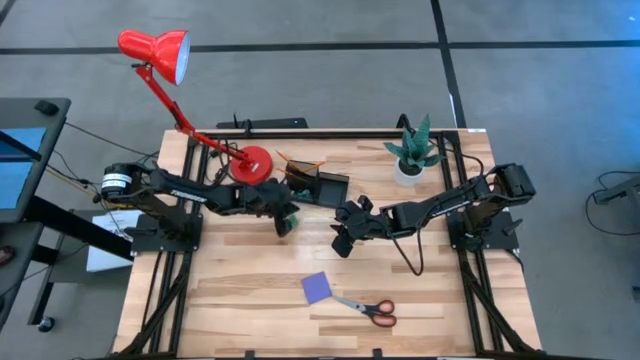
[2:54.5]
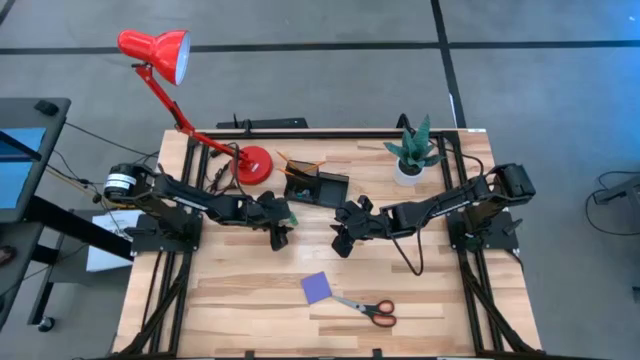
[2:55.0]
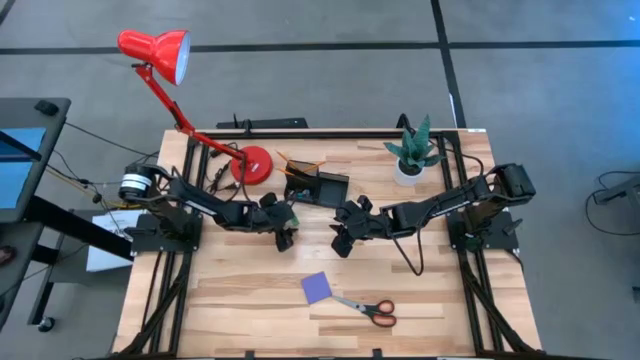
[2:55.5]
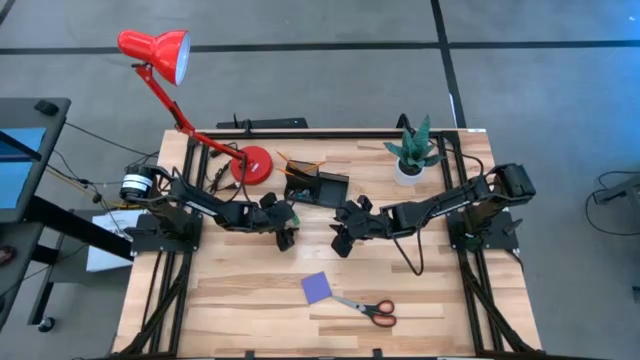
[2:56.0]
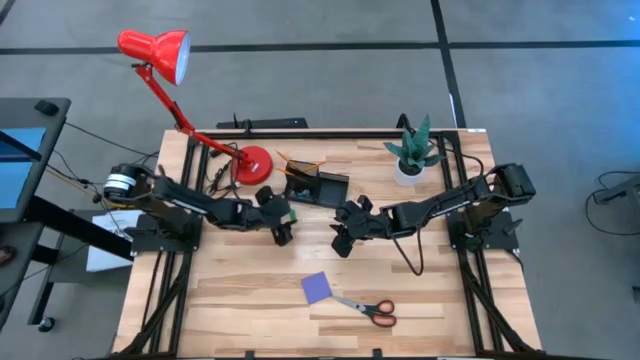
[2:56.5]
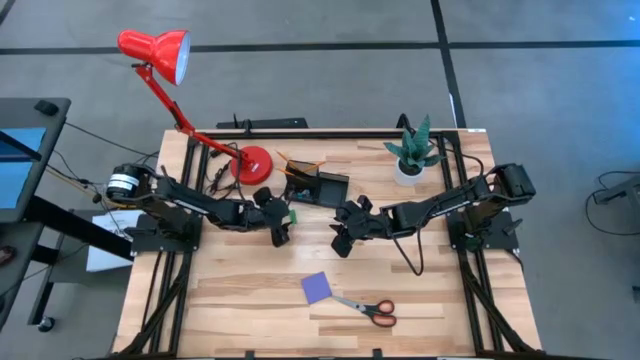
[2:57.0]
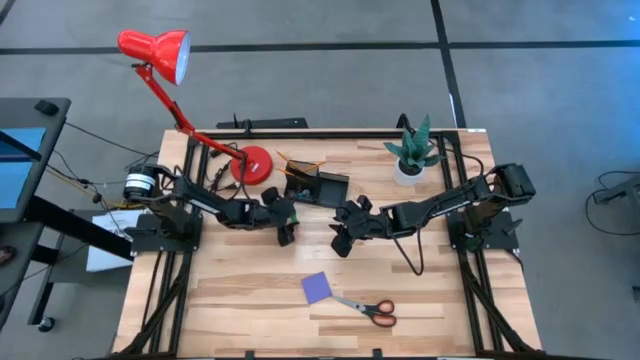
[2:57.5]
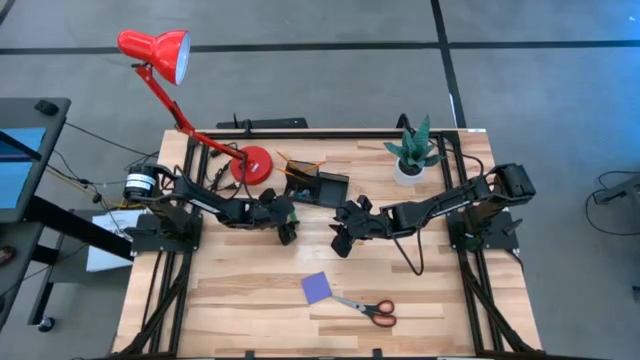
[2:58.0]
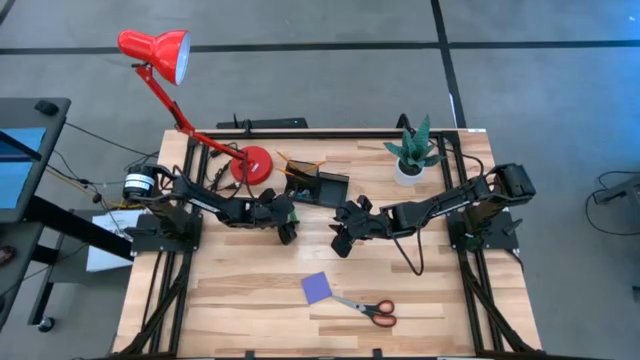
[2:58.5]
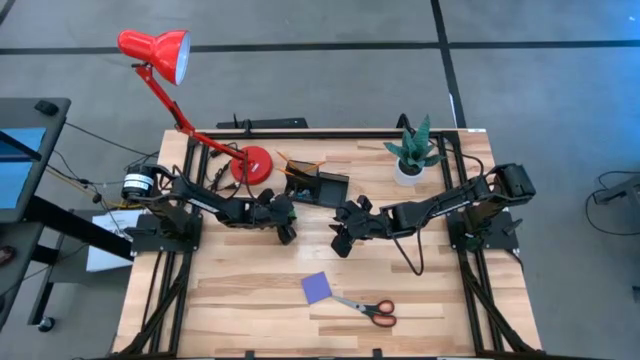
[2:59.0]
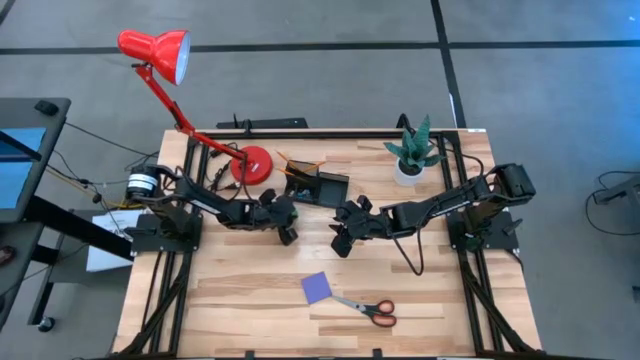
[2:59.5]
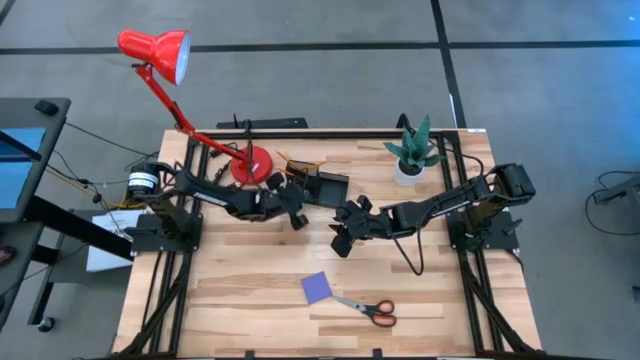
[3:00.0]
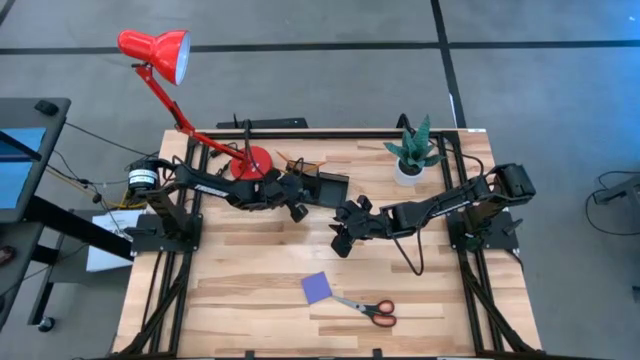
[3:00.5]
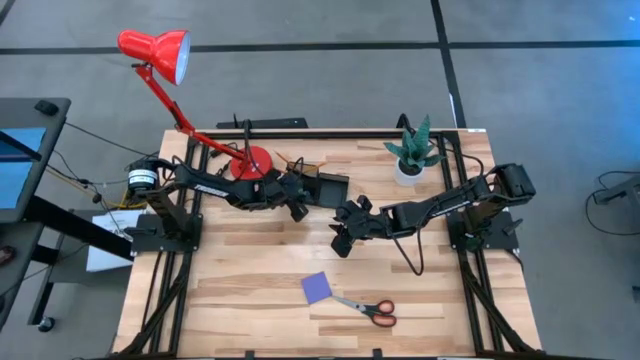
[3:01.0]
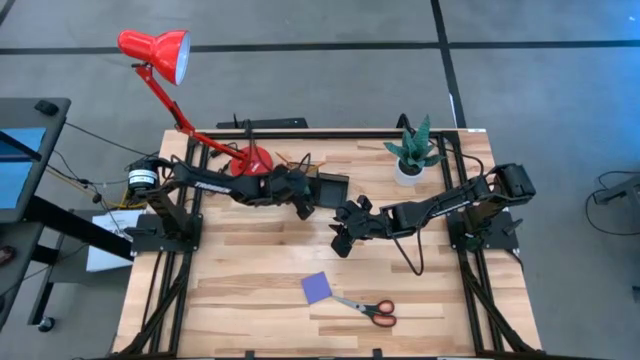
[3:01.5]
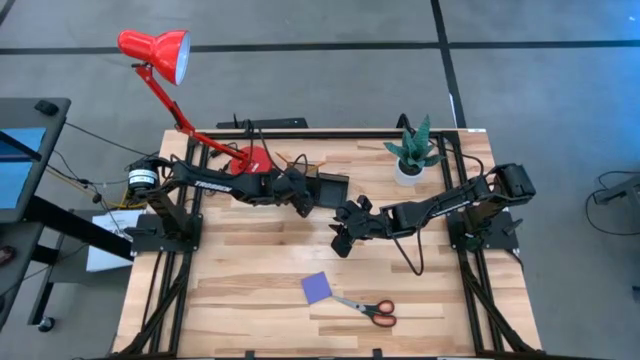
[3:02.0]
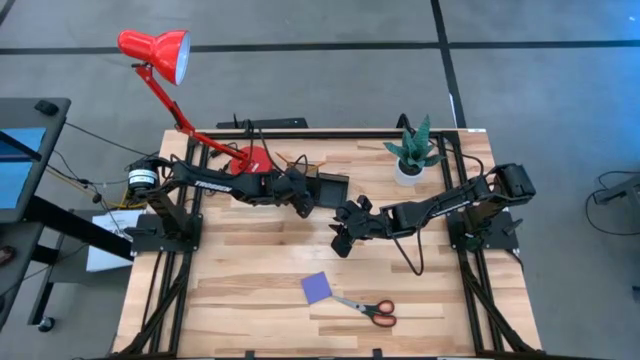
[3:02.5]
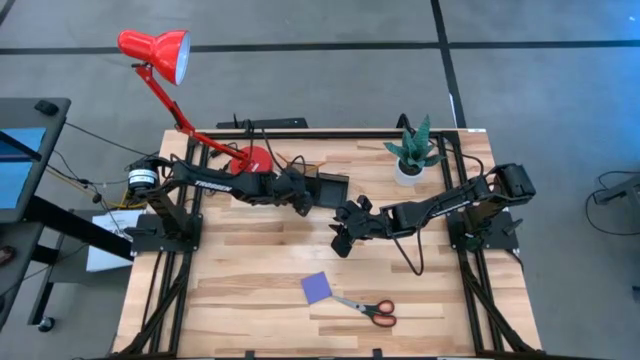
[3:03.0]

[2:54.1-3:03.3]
Task: Pick and place office supplies into organizer
Put the green eraser into the black desk organizer

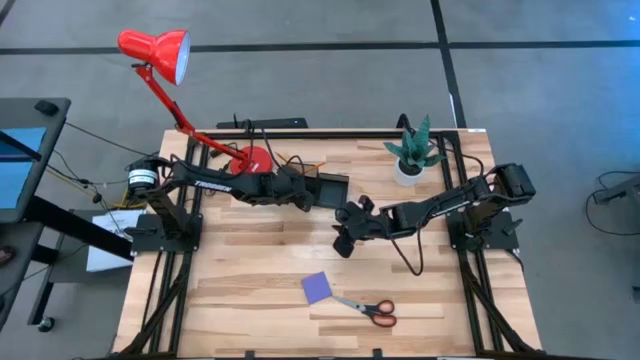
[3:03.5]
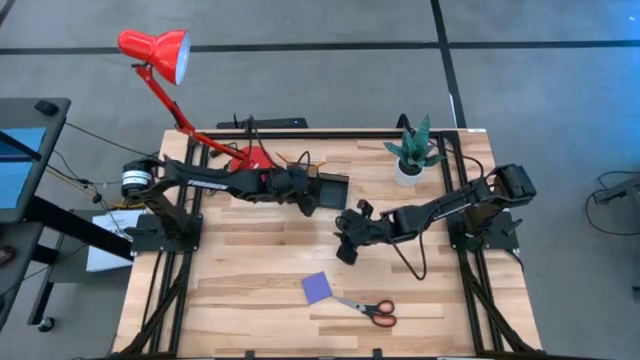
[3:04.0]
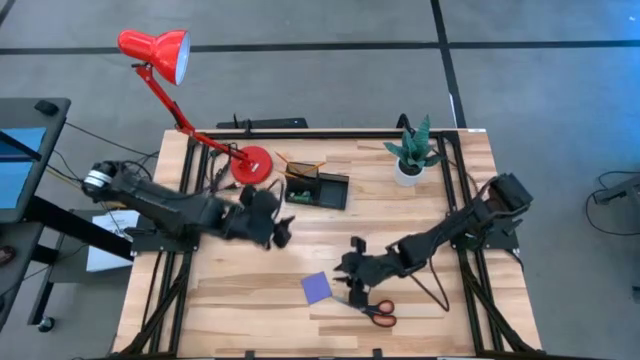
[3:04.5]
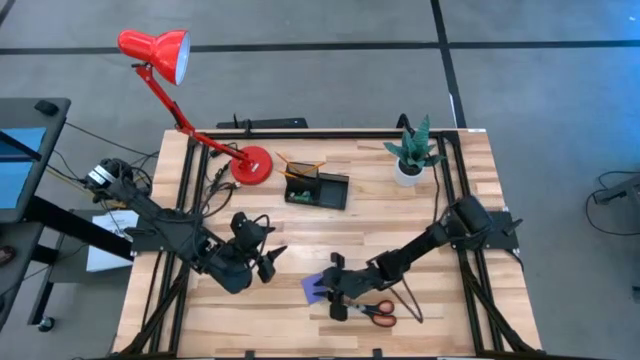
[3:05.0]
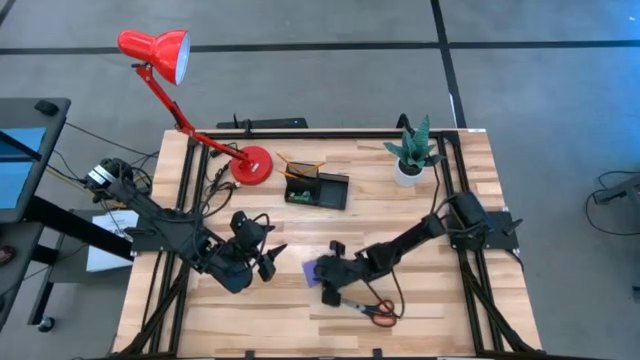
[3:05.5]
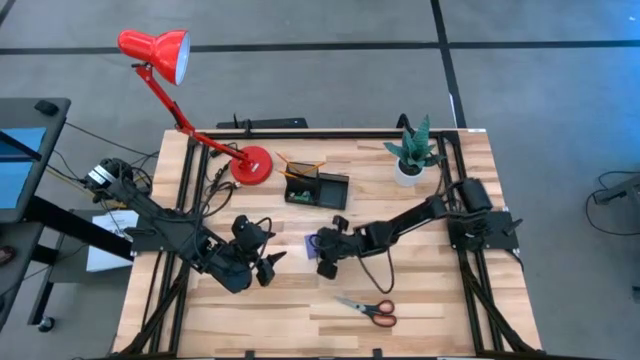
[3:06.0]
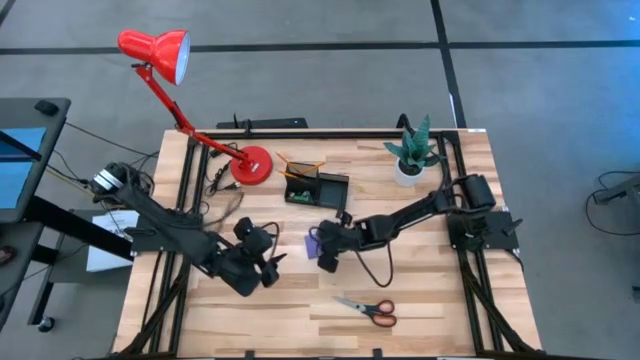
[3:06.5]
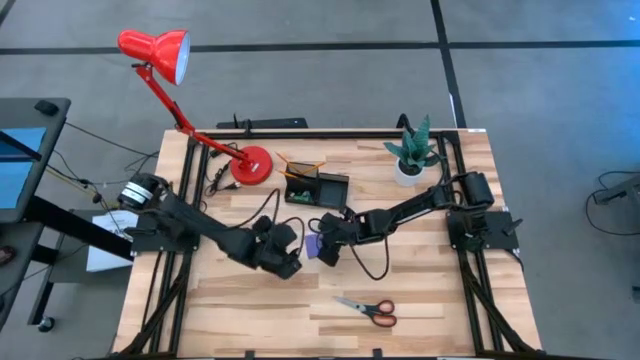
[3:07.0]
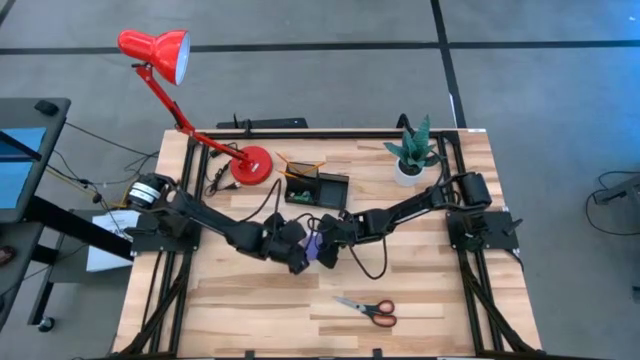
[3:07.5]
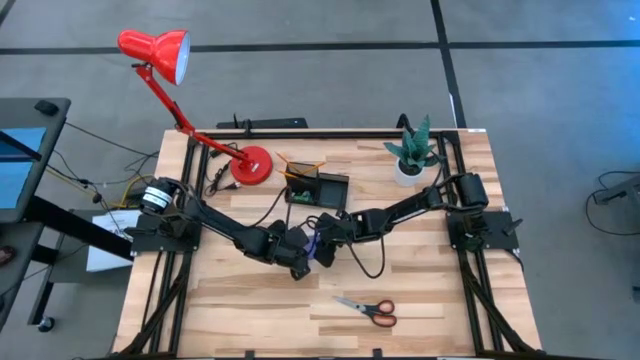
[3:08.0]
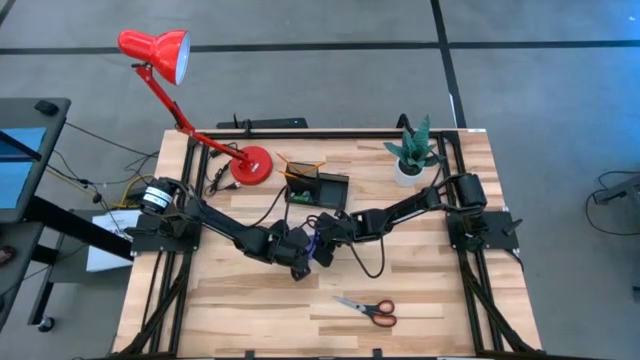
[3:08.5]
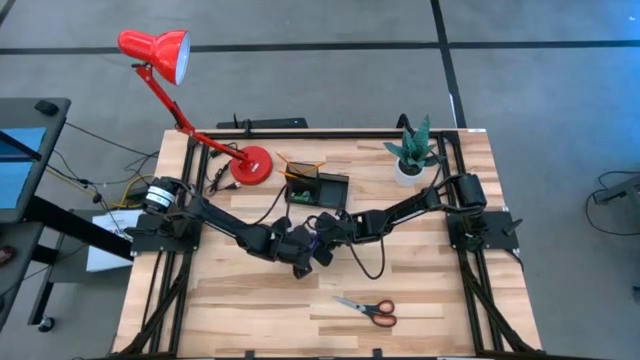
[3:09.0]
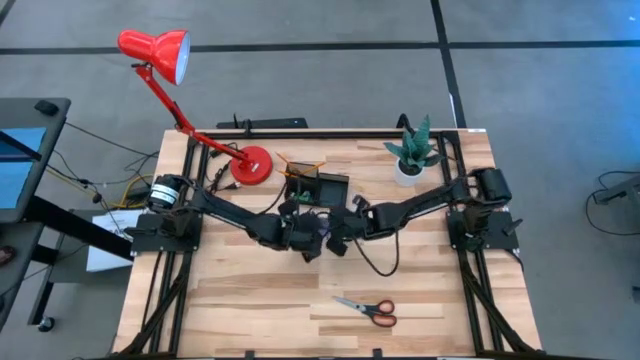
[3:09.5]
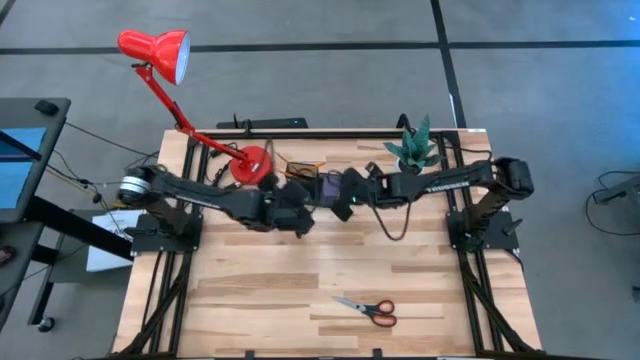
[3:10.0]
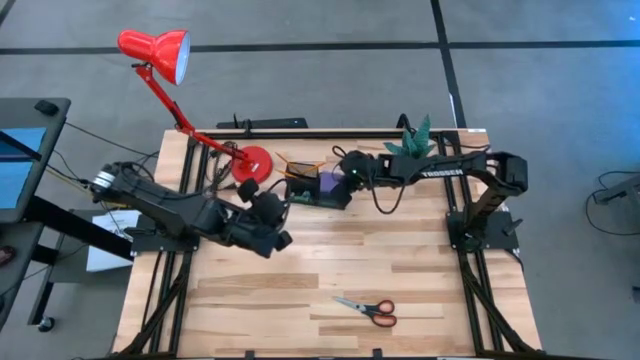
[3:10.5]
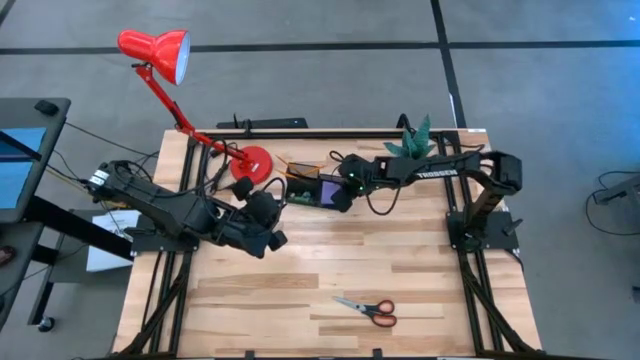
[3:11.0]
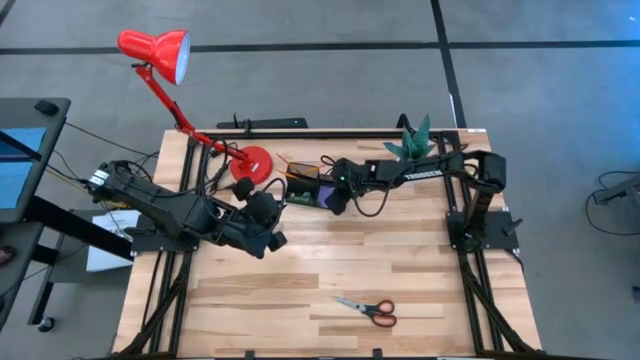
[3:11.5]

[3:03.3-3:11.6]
Put the violet sticky note into the black desk organizer

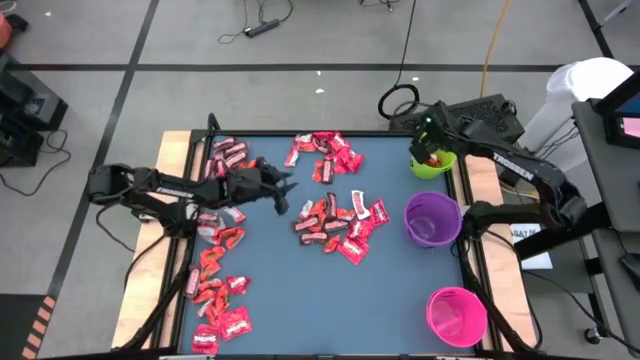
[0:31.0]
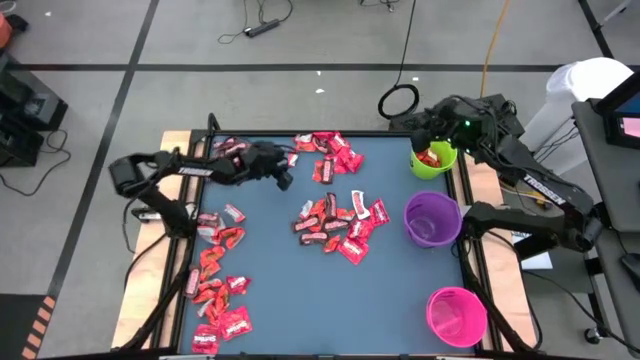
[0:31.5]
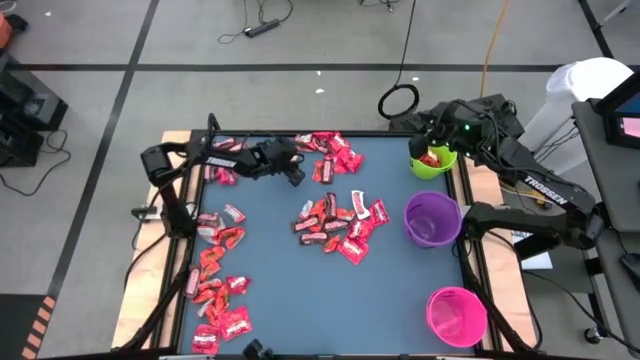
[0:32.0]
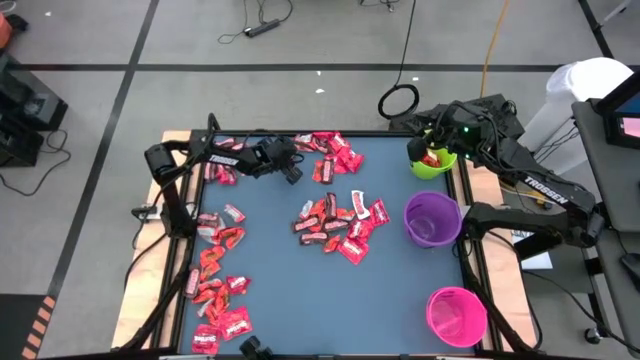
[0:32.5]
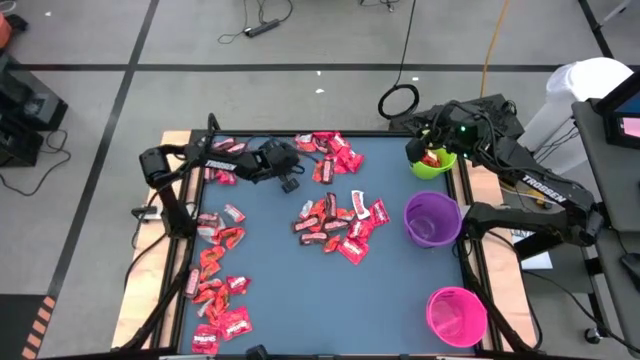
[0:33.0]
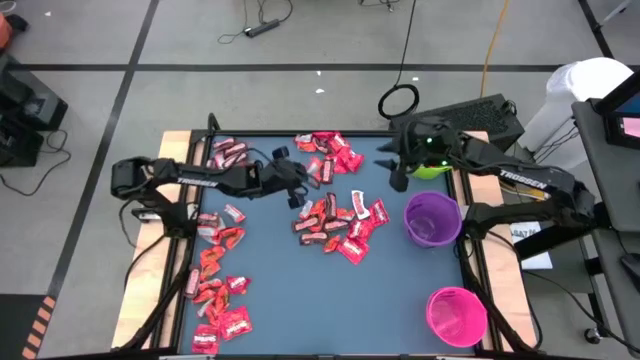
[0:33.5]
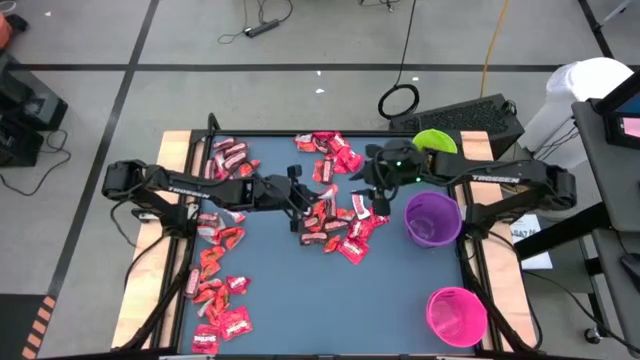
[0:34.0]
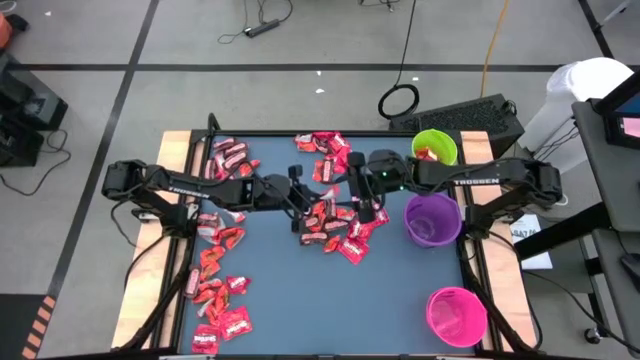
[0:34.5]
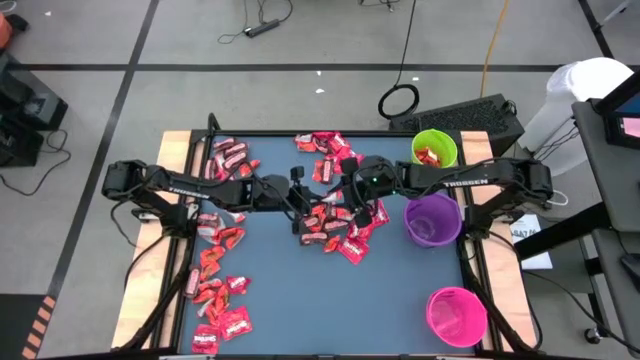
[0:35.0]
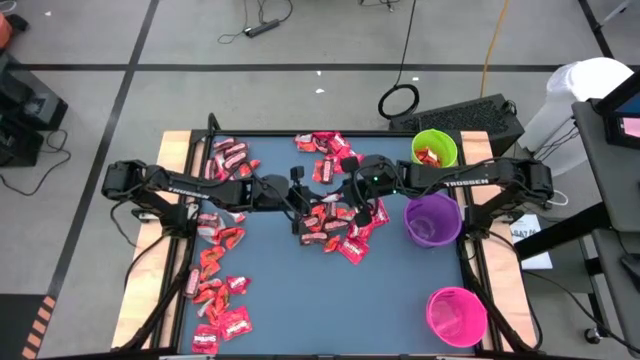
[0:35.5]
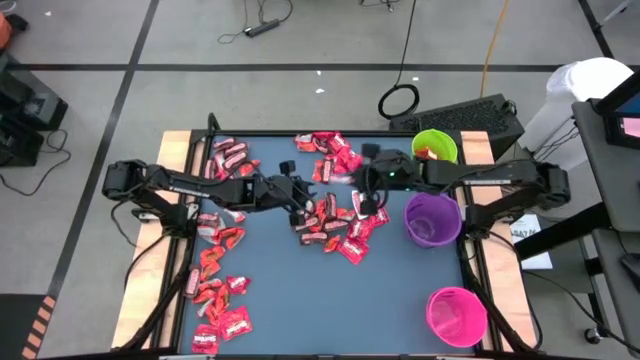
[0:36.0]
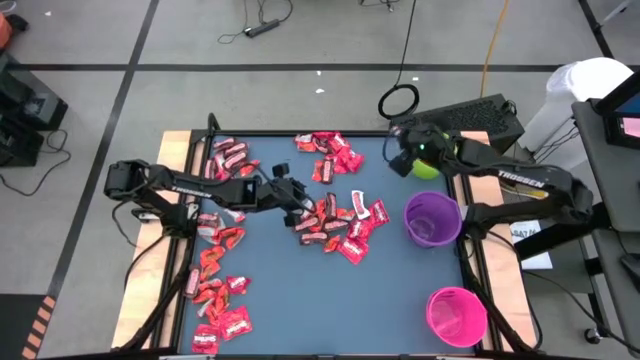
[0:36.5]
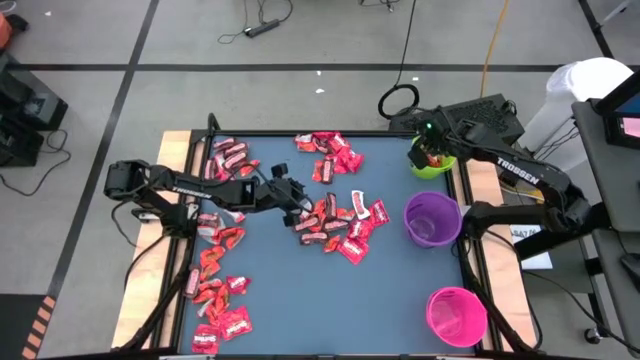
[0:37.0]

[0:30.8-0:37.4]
Task: Organize candy in baskets
Put the orange chocolate bar into the green bucket
